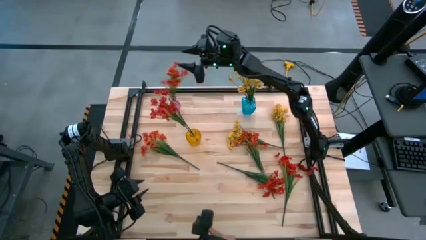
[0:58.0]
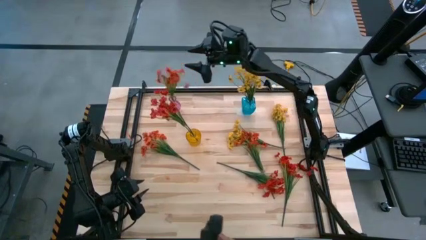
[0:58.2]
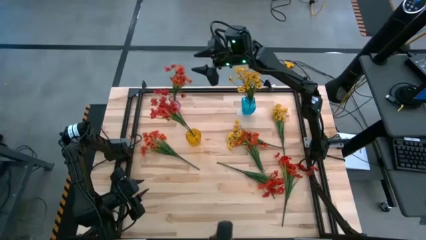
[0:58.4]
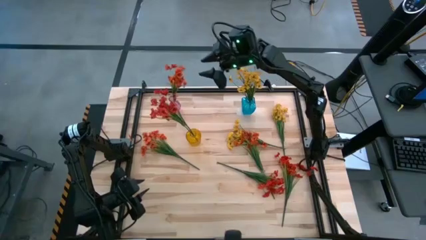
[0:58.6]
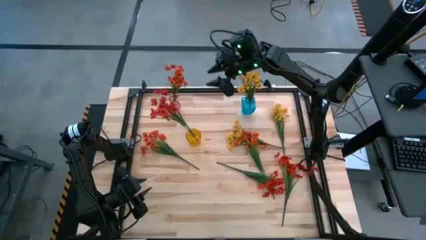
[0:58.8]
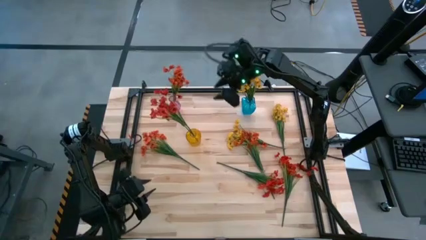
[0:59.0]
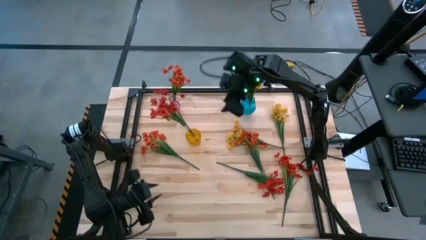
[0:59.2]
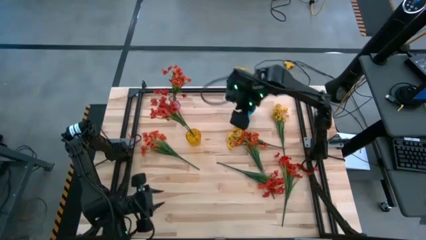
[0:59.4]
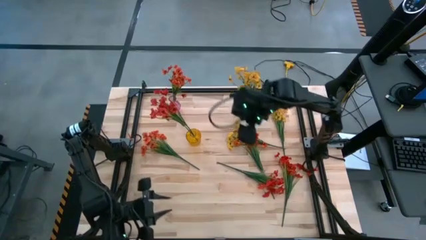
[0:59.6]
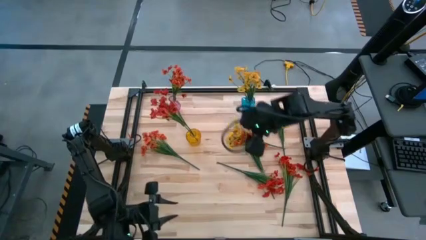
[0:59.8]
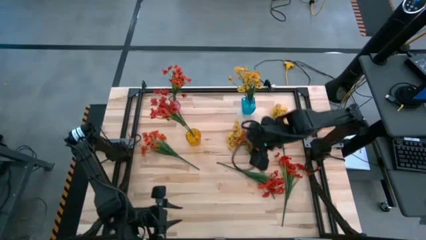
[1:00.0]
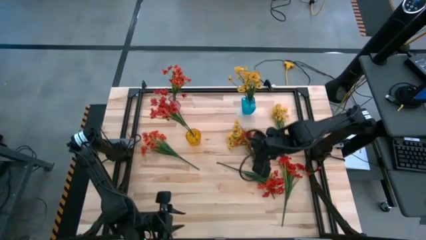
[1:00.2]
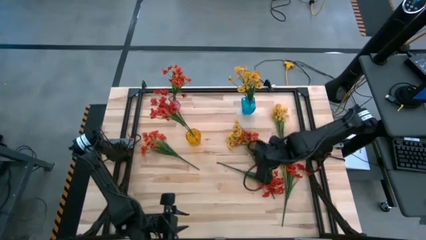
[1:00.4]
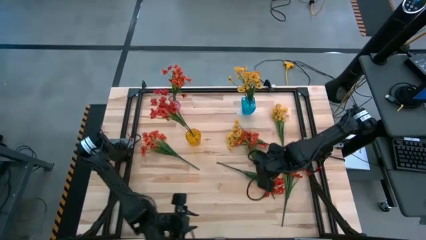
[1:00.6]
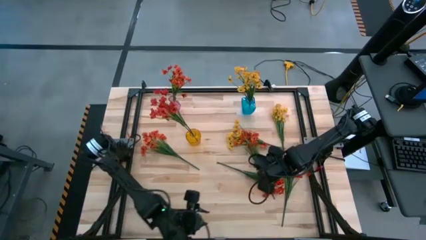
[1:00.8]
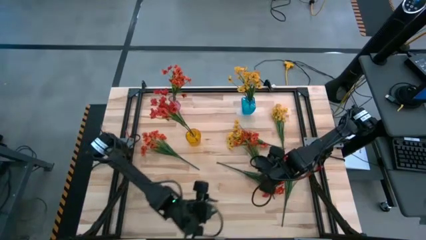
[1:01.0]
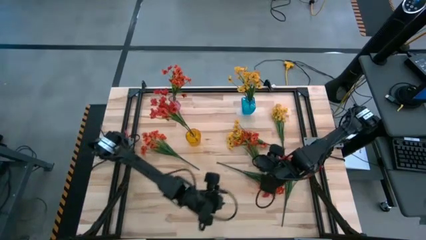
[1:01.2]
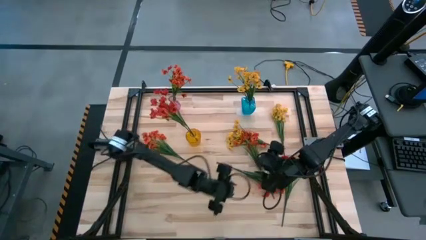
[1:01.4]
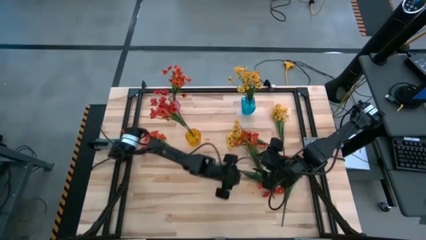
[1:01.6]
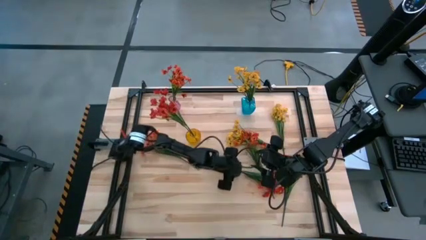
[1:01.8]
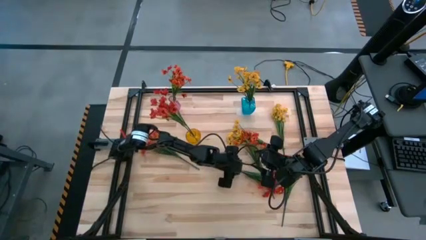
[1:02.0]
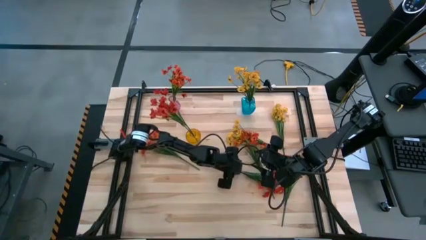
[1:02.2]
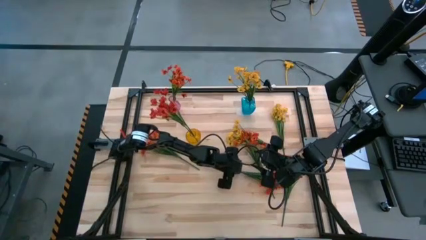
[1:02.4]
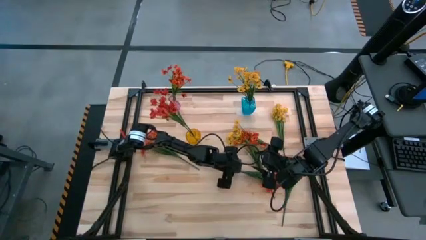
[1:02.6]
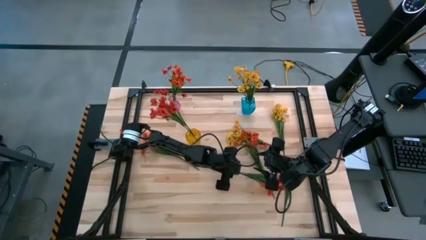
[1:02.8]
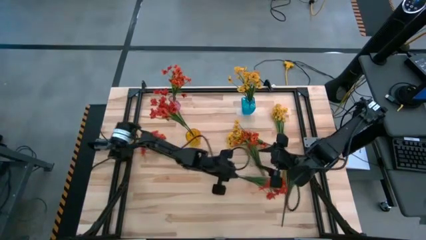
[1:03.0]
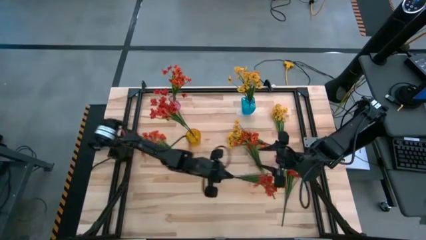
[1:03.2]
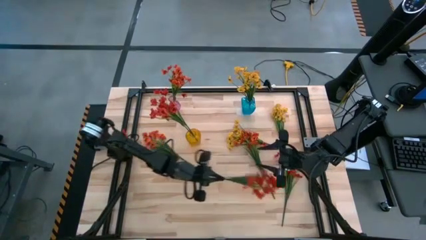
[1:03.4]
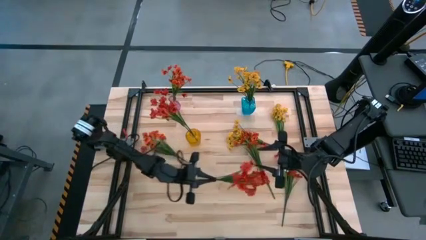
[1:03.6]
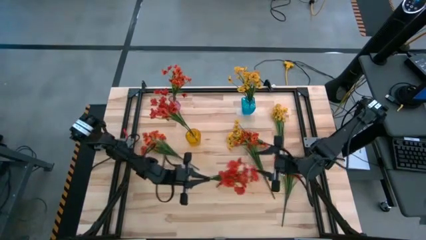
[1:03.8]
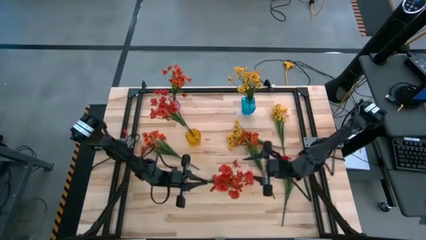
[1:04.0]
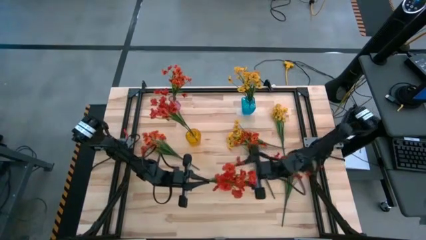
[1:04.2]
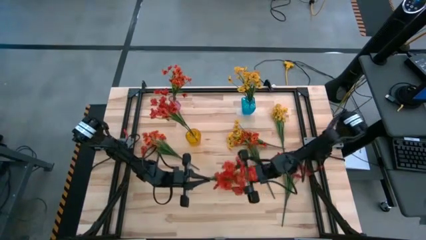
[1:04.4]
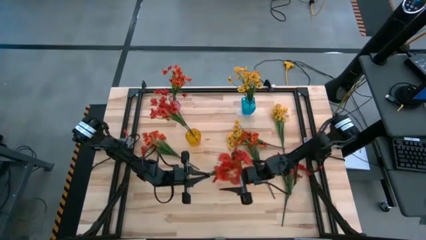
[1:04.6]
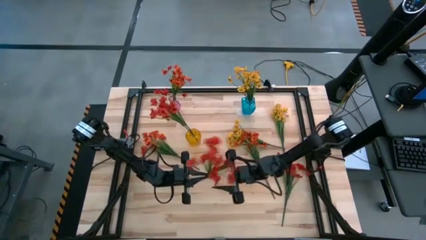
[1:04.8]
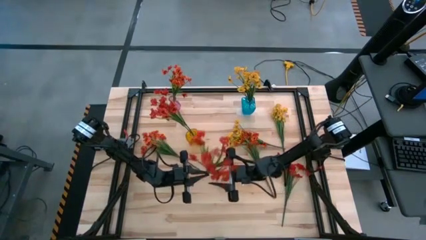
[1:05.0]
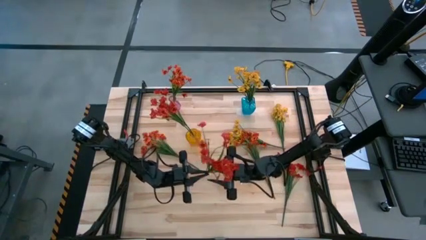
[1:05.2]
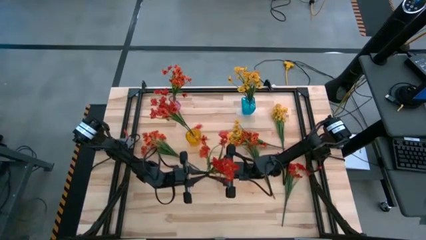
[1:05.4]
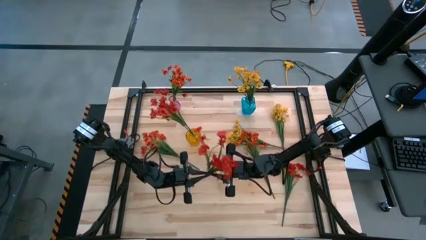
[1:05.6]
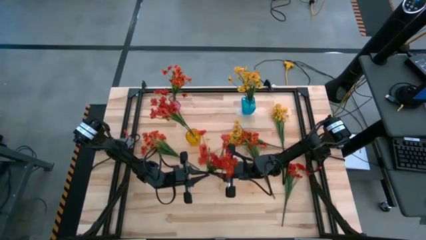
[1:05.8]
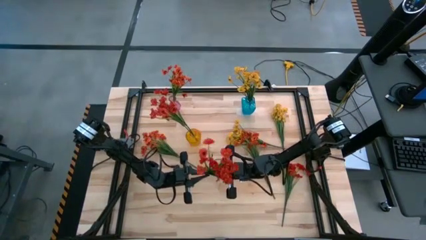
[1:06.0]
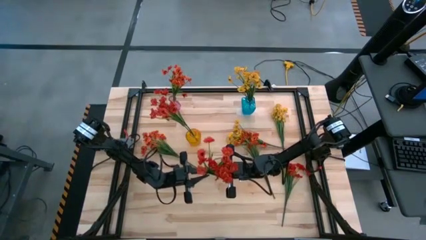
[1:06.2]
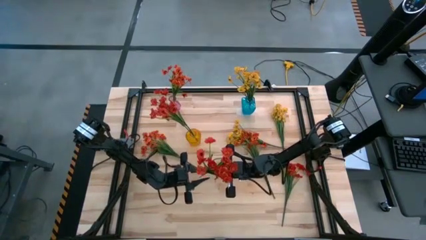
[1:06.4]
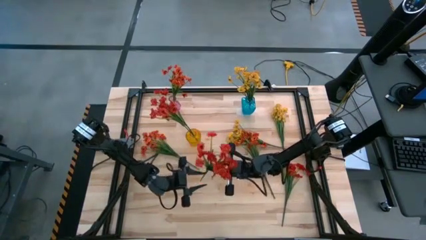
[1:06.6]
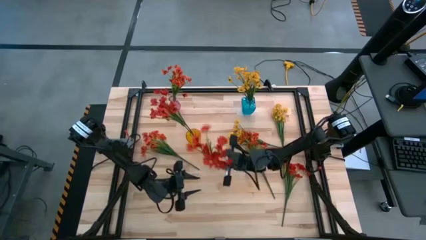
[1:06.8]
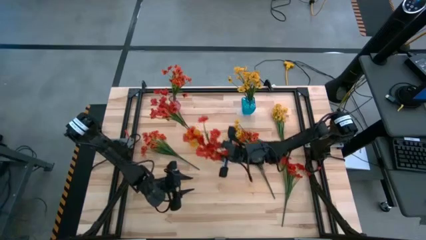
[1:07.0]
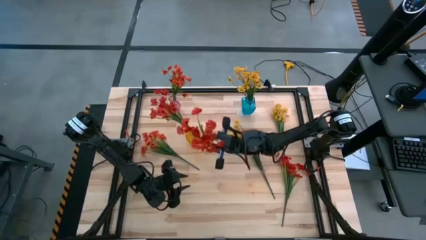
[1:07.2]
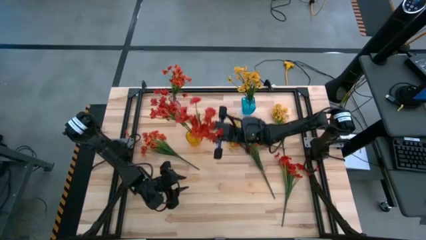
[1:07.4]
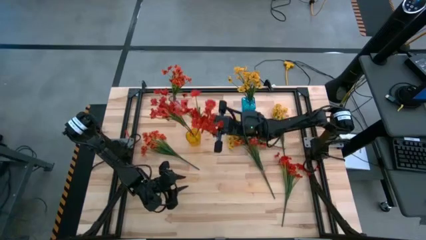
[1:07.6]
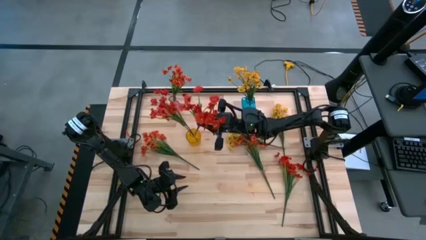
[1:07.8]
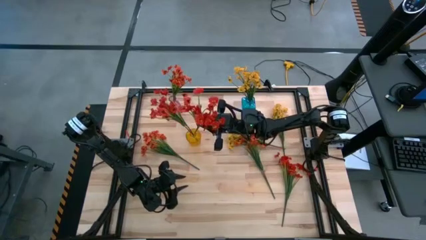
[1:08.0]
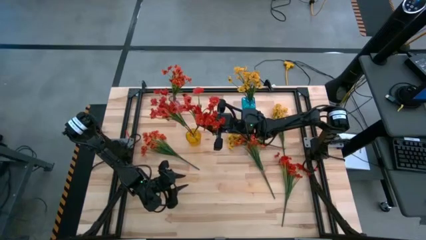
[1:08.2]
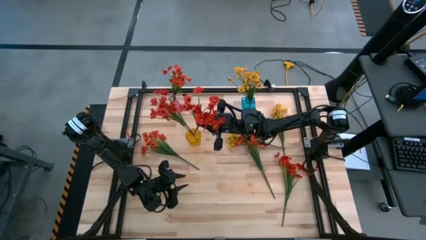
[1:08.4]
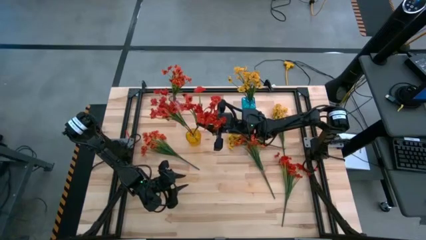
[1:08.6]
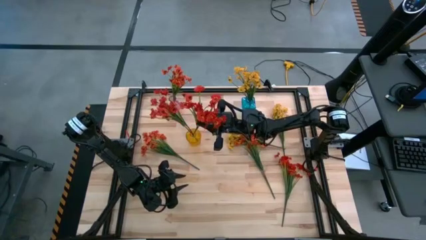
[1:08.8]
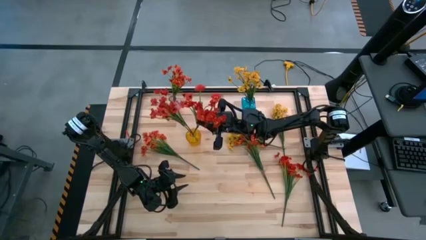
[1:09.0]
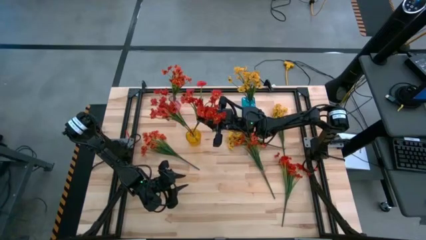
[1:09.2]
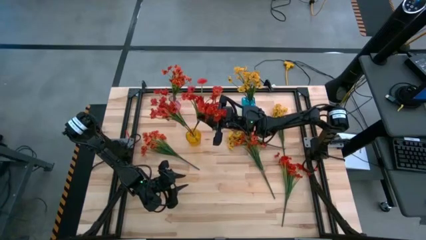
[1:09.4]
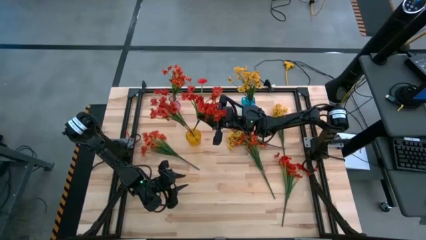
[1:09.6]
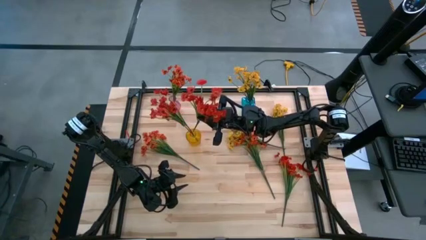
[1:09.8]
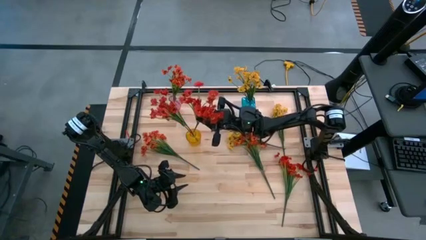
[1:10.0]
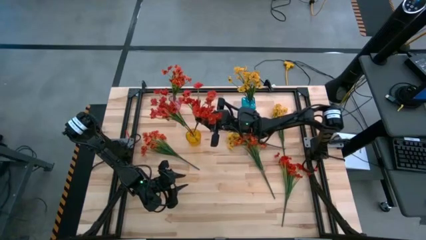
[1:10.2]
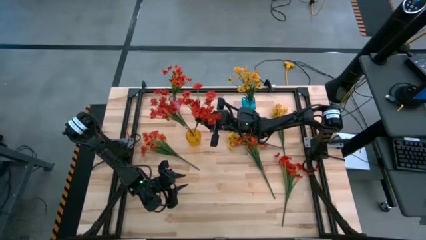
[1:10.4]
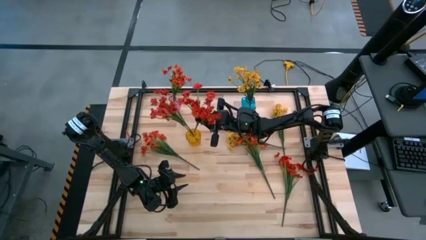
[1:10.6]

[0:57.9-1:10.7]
Task: Sort flowers into vase by color
Put left red flower into the yellow vase
